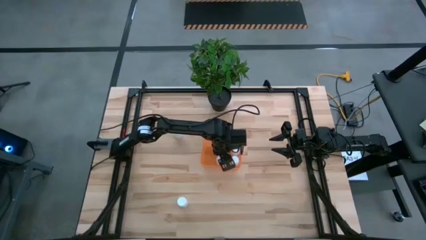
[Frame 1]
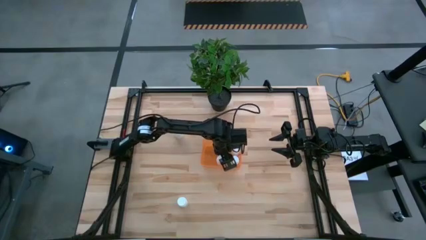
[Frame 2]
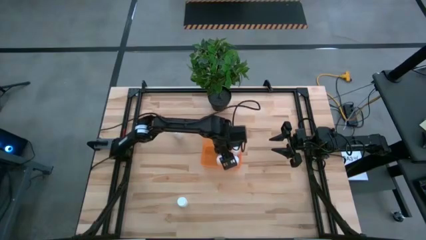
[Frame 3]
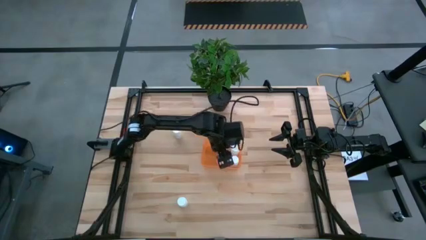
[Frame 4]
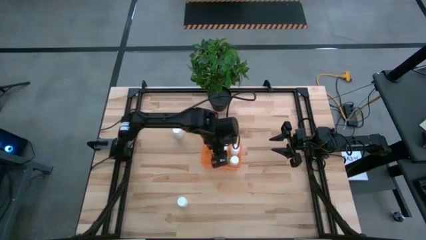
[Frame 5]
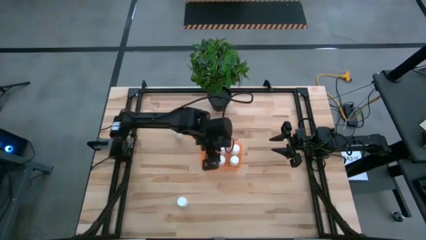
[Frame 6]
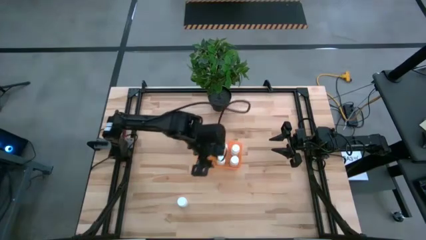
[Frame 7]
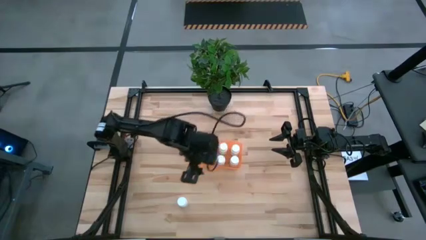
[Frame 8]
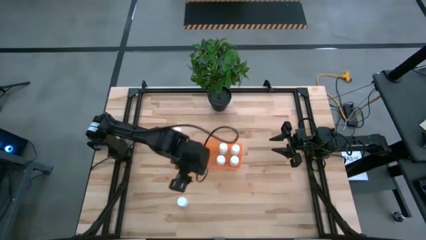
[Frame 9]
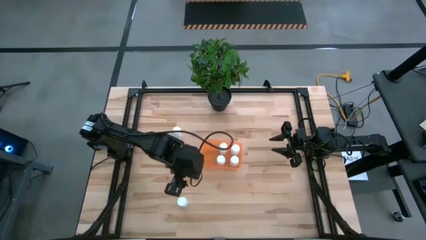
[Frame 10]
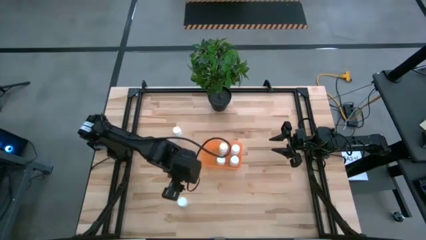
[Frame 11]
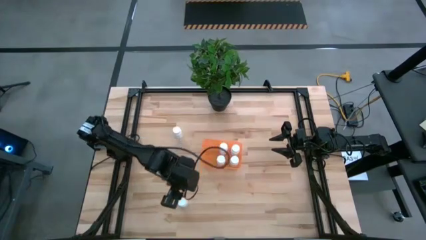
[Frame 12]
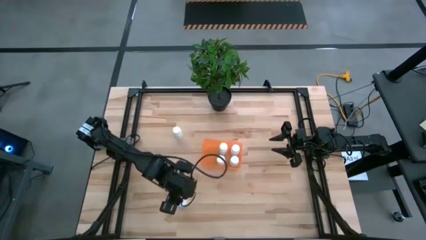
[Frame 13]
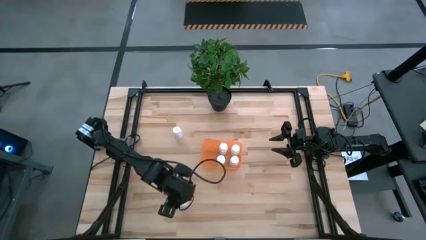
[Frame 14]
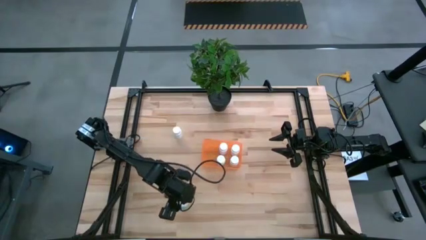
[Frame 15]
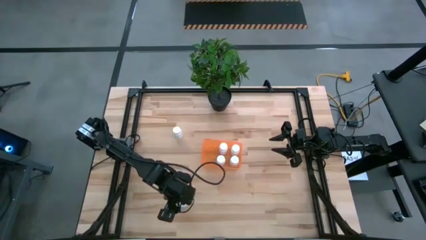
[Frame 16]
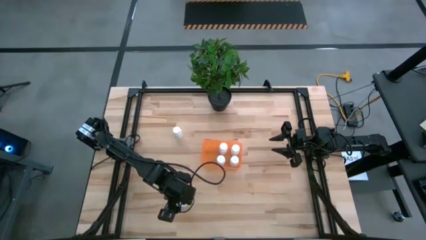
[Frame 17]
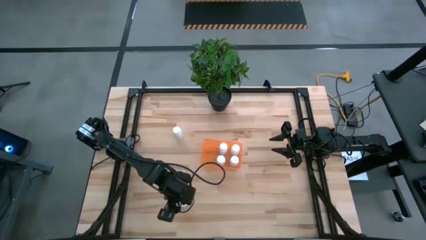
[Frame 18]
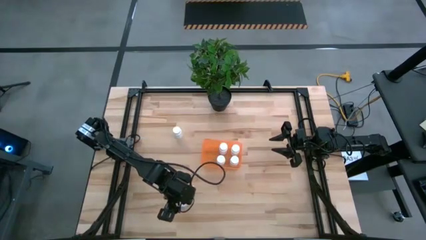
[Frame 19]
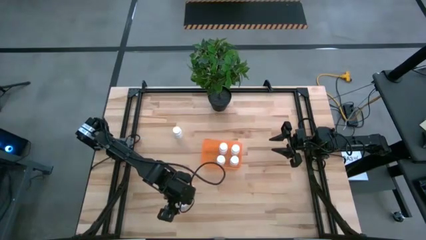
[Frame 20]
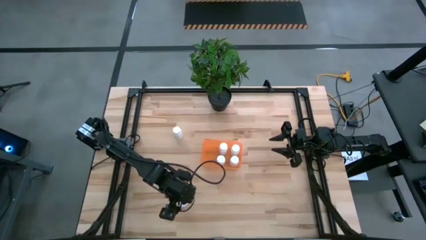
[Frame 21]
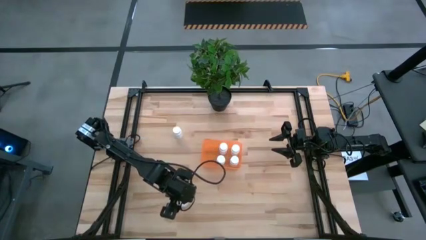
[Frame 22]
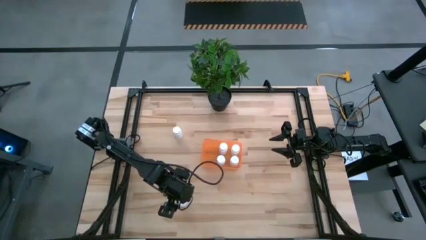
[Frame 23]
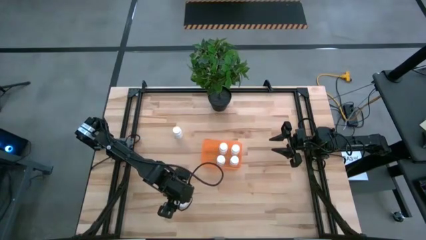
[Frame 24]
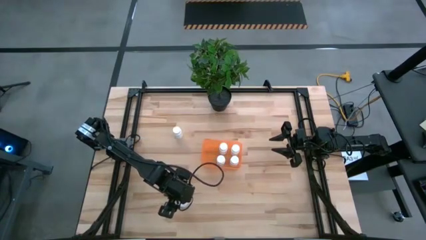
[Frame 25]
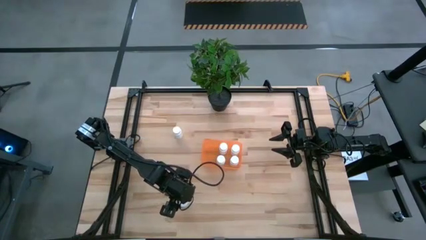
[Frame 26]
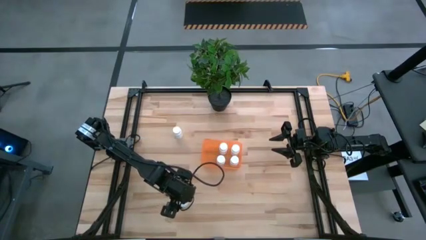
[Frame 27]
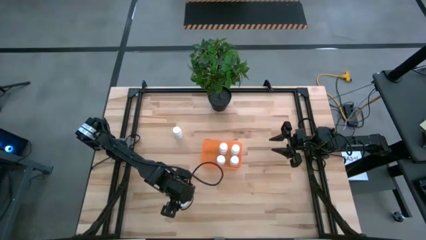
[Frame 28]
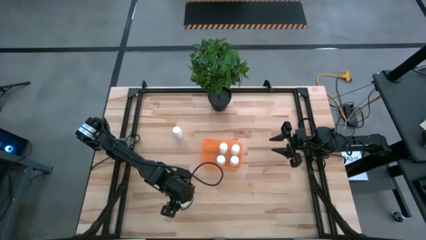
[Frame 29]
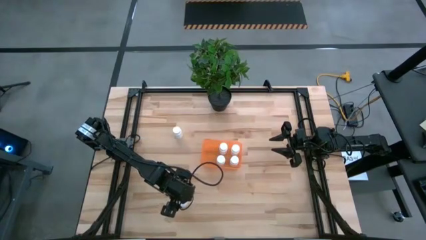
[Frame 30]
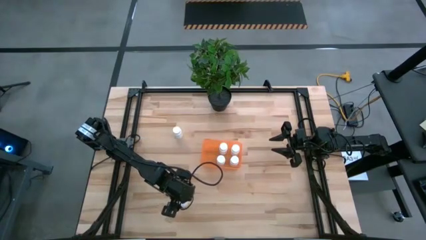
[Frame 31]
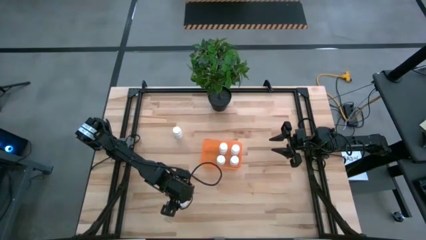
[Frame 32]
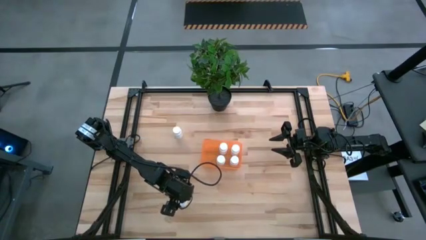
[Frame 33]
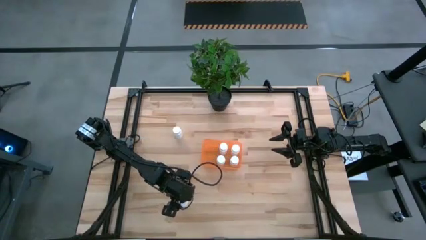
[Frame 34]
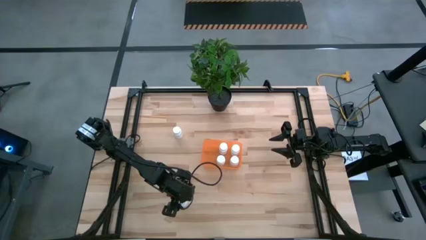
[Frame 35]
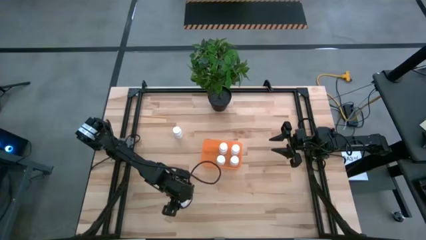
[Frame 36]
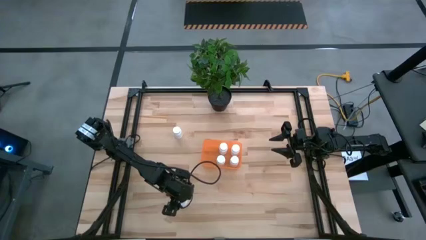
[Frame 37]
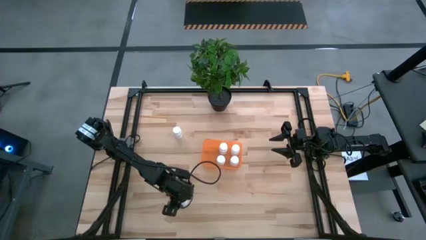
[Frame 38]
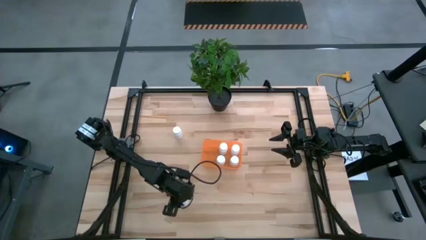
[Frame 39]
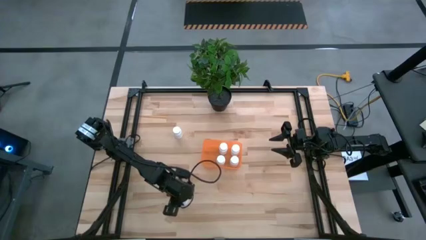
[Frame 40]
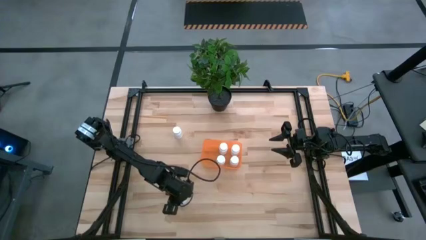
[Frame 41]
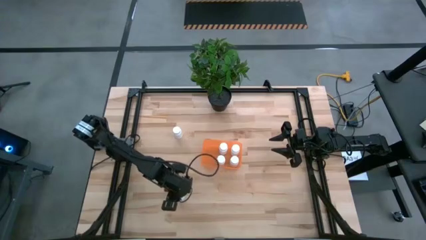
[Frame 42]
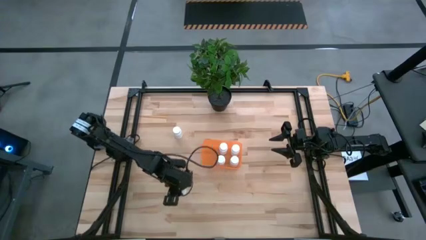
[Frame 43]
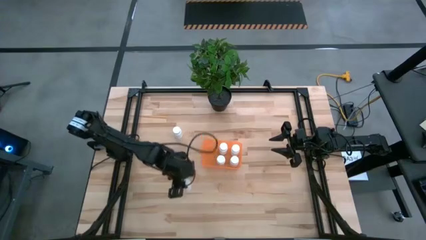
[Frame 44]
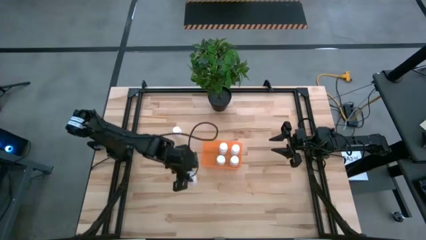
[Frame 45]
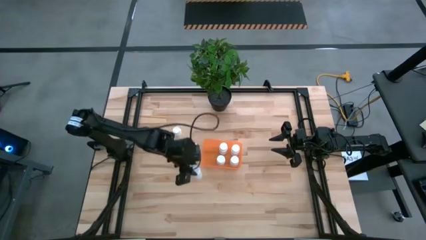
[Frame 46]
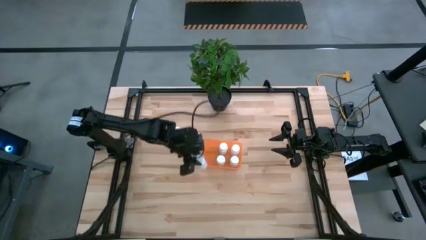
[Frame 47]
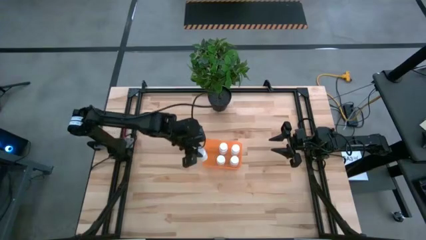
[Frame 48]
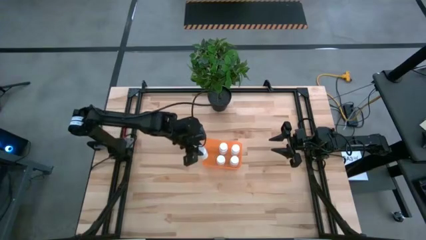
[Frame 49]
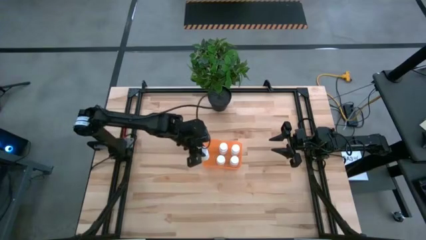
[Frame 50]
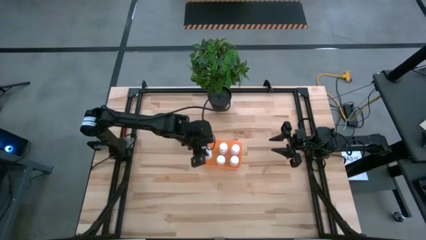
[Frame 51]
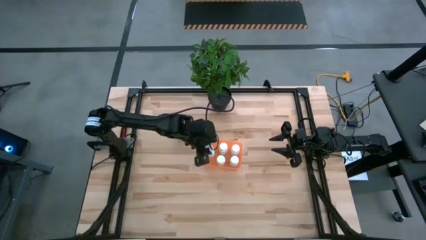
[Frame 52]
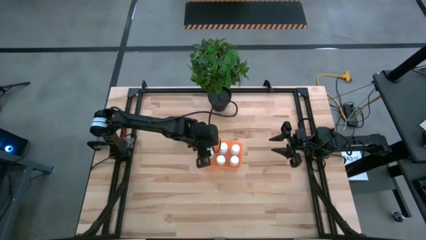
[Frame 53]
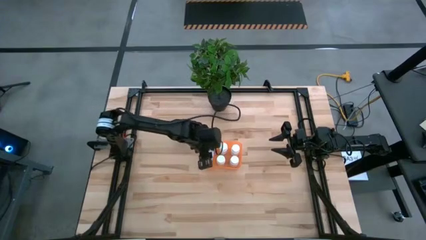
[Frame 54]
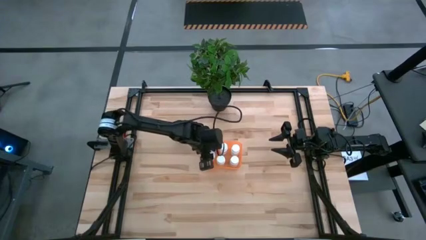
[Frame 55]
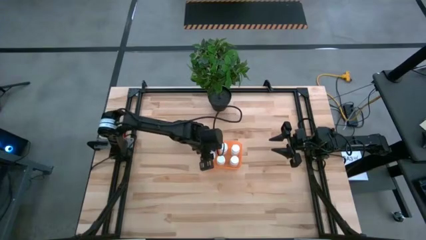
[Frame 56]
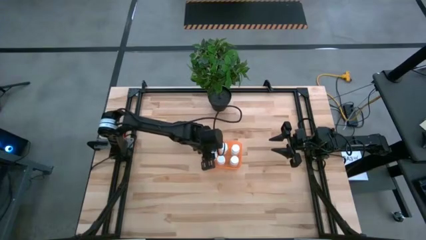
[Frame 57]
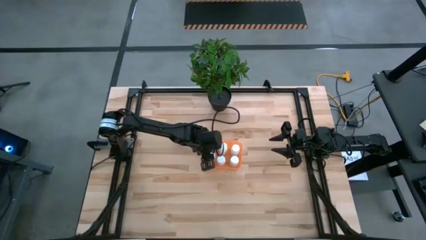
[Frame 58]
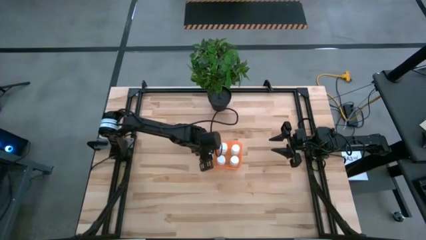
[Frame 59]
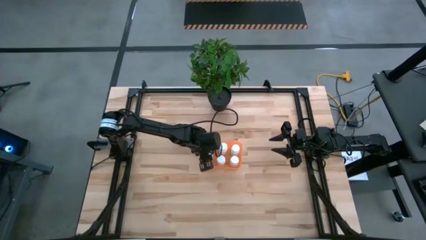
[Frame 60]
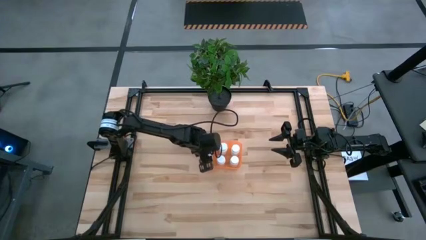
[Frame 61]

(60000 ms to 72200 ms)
Task: Pick and place pill bottles into a basket
Put the white pill bottle into the orange bin
